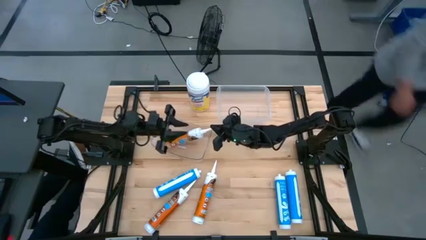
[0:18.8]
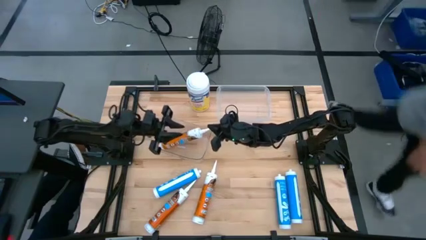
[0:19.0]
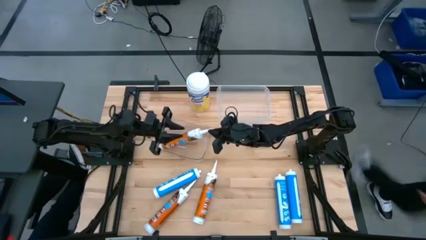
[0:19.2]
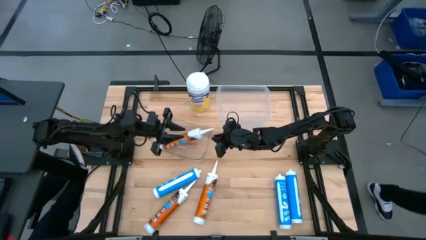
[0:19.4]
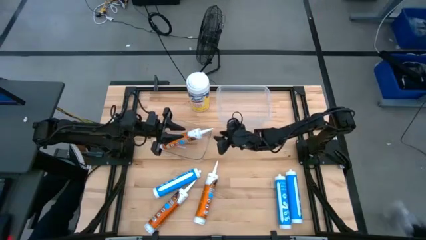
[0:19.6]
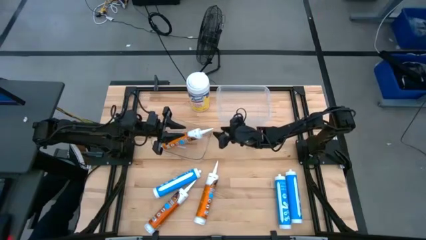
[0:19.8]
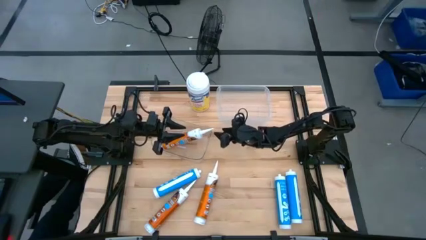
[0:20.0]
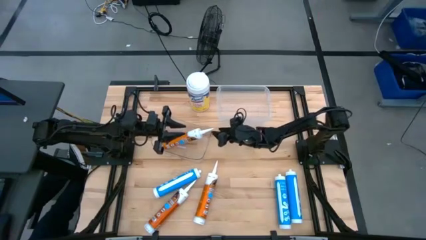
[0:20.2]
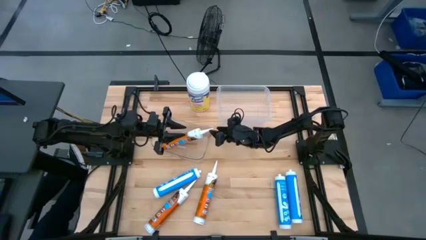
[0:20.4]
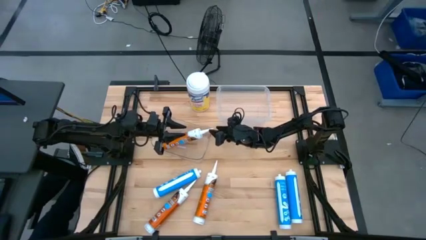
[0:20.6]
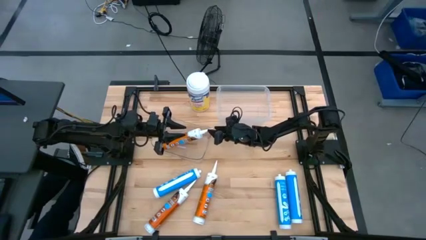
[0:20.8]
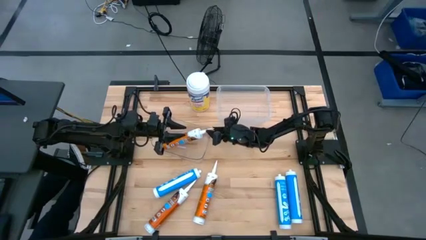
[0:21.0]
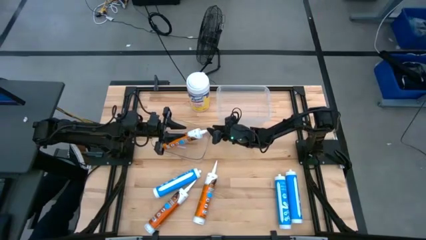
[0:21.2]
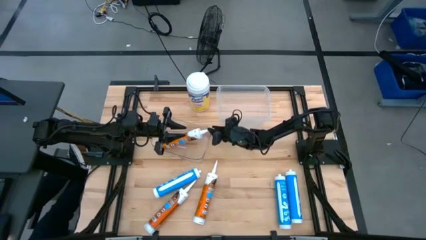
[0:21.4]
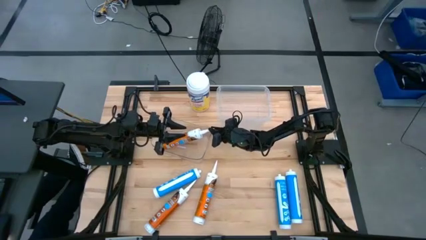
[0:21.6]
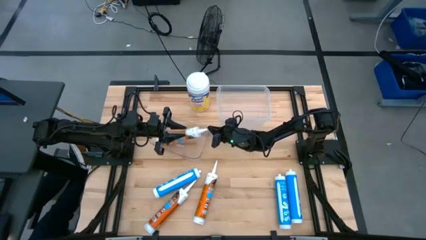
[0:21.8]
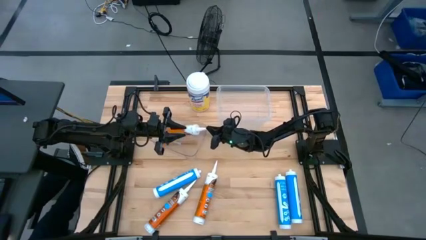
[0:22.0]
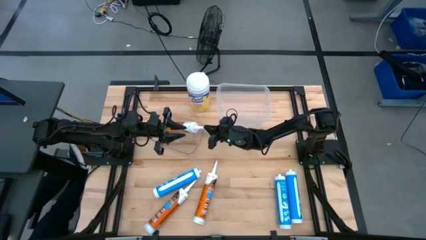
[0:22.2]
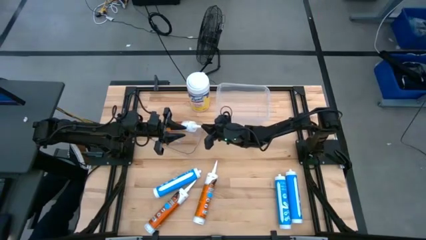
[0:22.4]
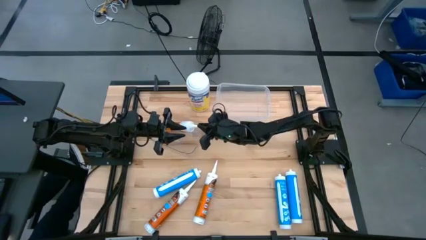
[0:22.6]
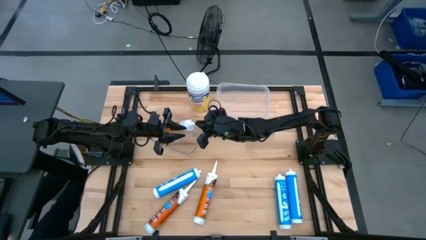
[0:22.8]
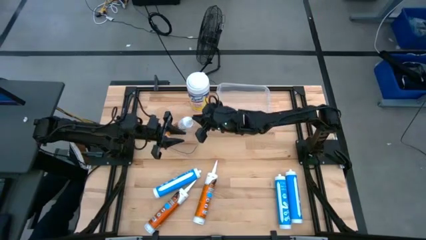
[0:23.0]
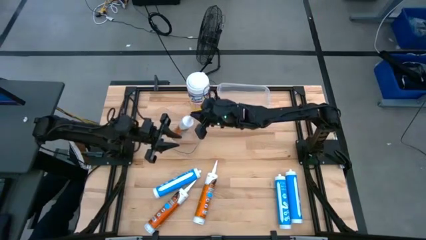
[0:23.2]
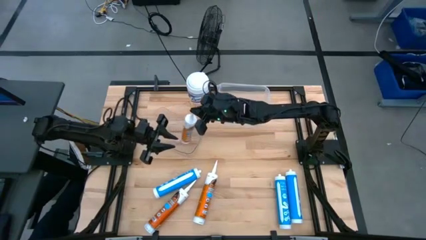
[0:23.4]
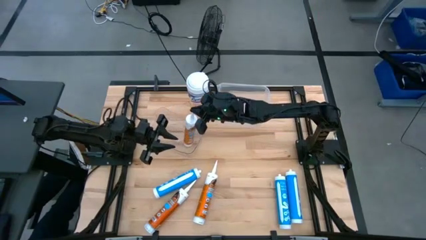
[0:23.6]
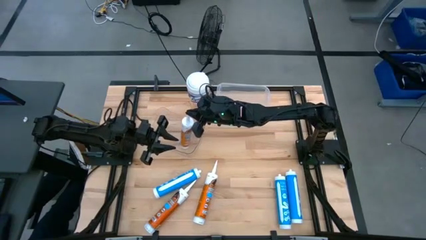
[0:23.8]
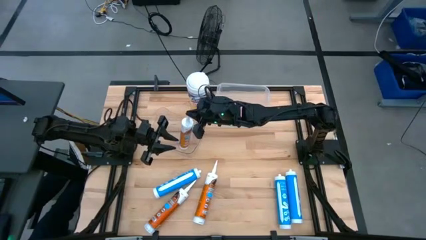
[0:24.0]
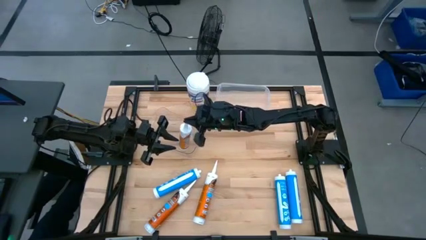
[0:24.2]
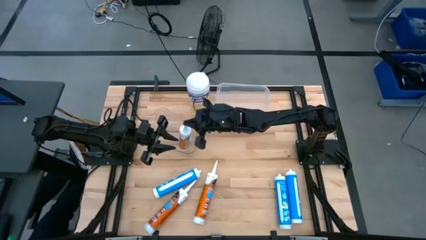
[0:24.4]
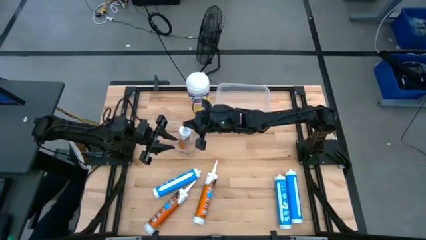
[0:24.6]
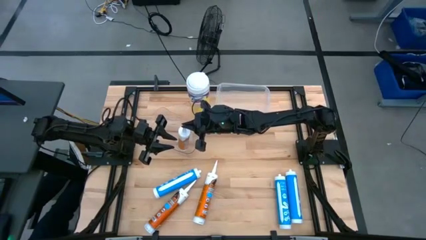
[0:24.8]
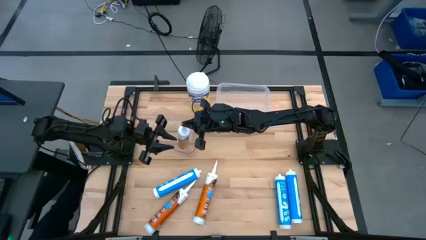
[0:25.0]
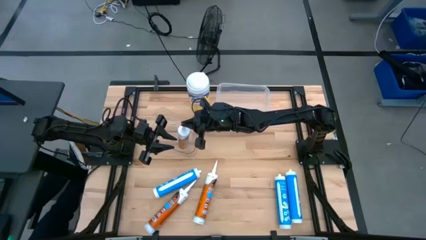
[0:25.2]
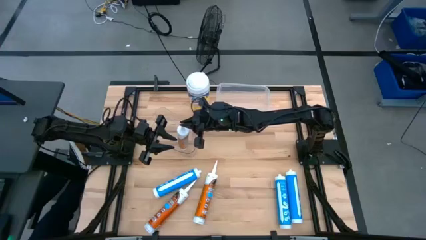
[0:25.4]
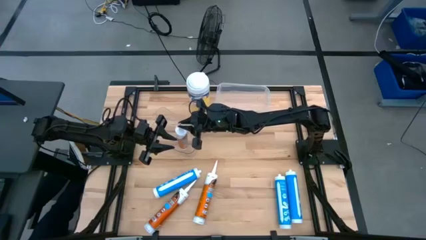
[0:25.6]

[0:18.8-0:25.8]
Task: Pick & place silicon tubes, Sealant and Lysol wipes
Put the right orange sealant into the left transparent bin

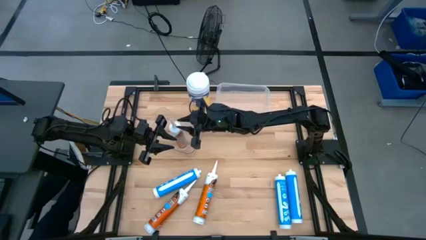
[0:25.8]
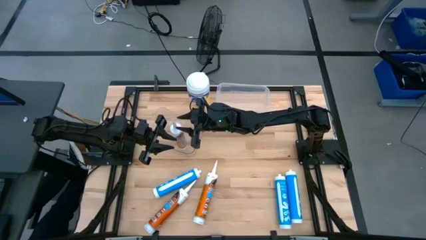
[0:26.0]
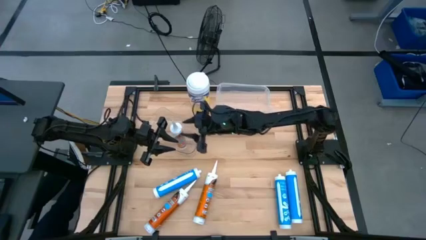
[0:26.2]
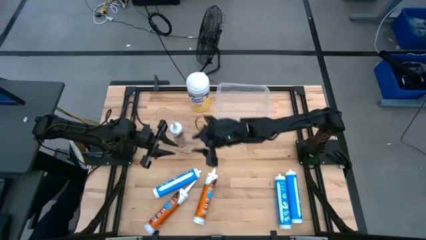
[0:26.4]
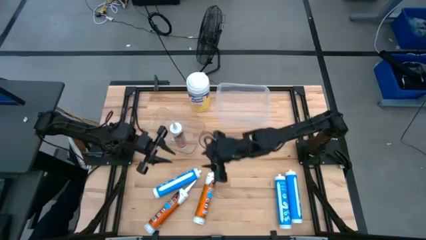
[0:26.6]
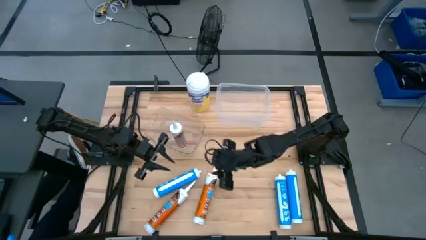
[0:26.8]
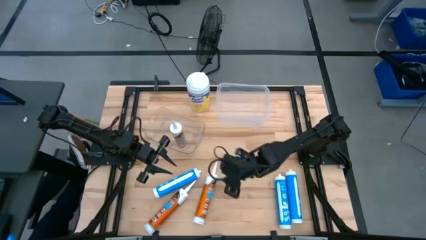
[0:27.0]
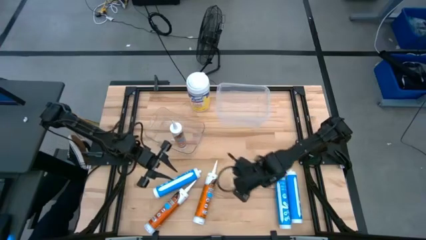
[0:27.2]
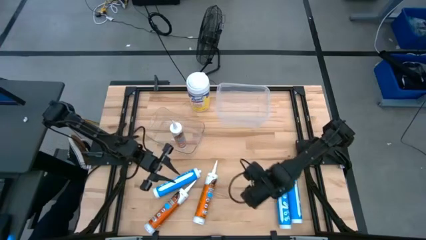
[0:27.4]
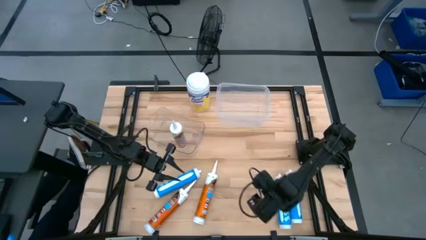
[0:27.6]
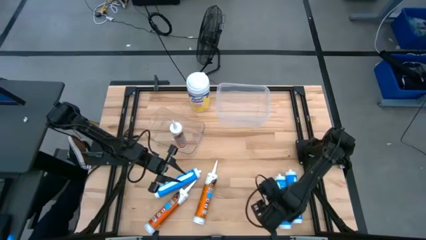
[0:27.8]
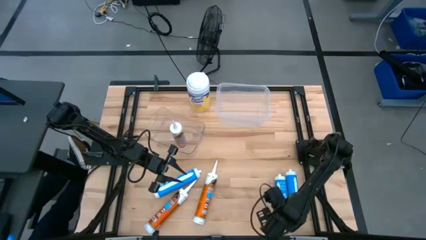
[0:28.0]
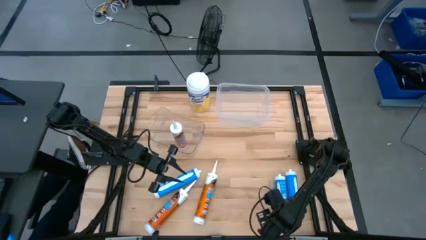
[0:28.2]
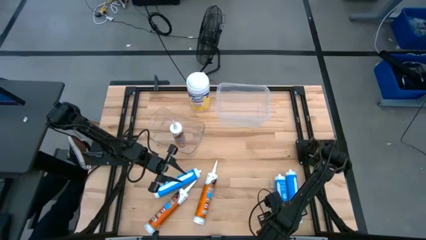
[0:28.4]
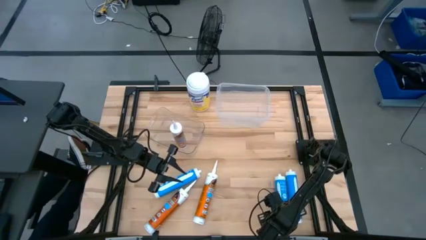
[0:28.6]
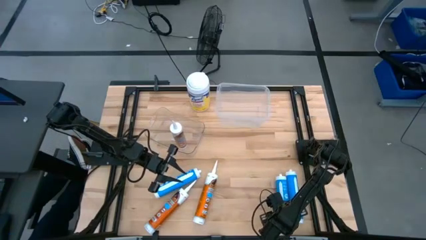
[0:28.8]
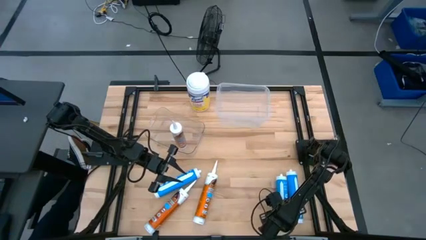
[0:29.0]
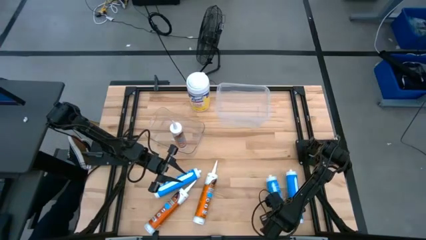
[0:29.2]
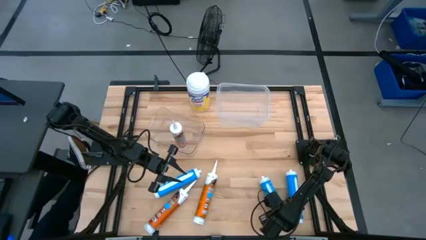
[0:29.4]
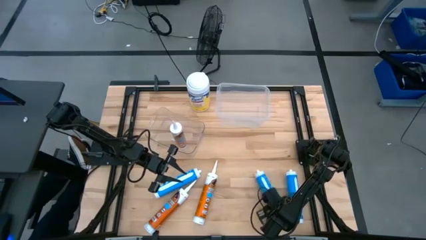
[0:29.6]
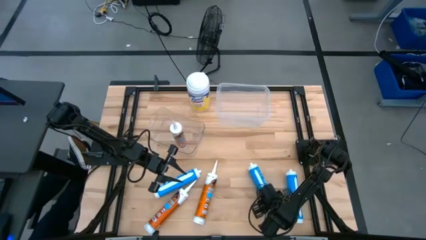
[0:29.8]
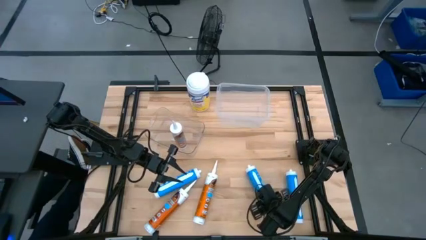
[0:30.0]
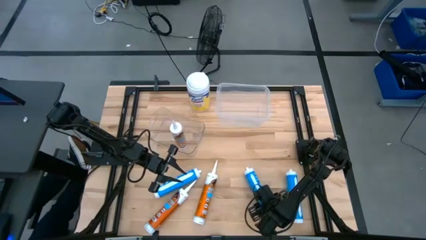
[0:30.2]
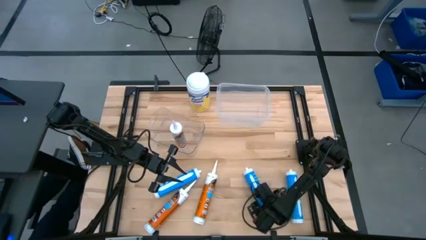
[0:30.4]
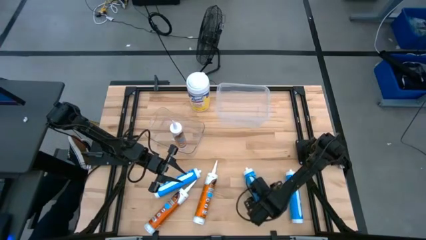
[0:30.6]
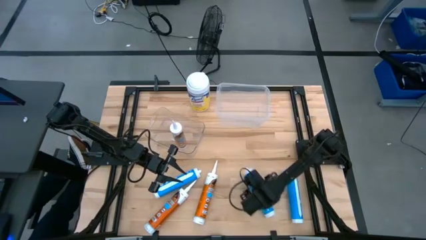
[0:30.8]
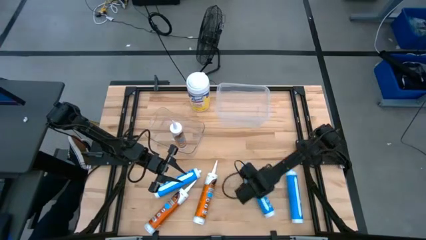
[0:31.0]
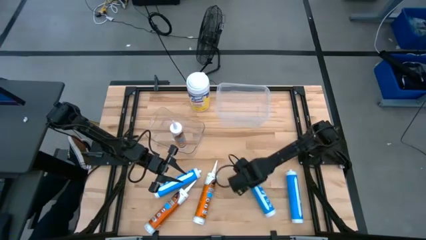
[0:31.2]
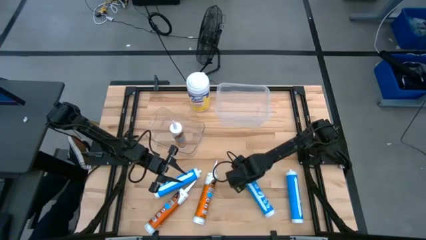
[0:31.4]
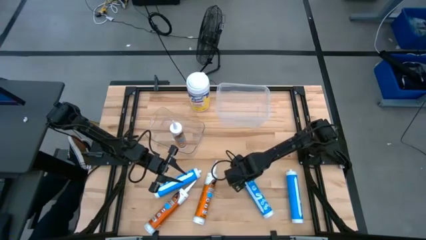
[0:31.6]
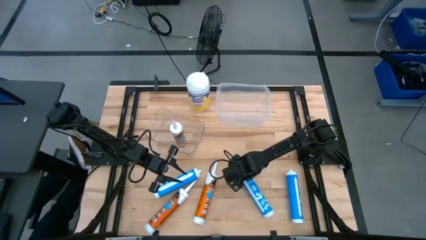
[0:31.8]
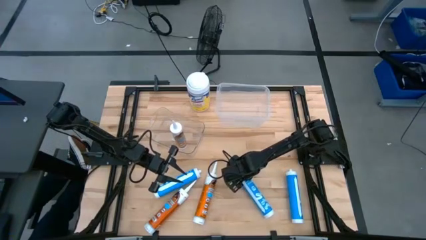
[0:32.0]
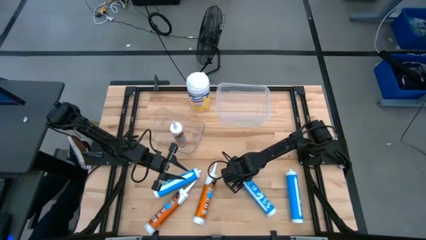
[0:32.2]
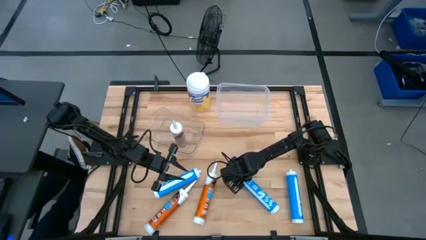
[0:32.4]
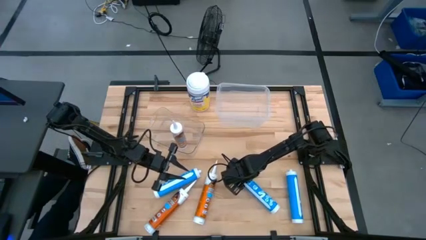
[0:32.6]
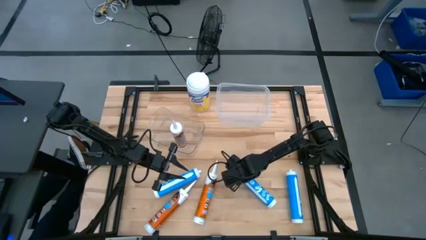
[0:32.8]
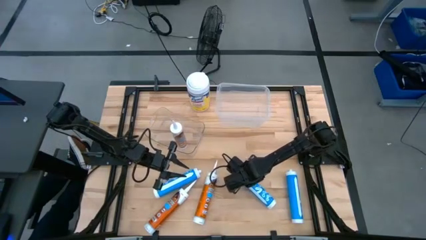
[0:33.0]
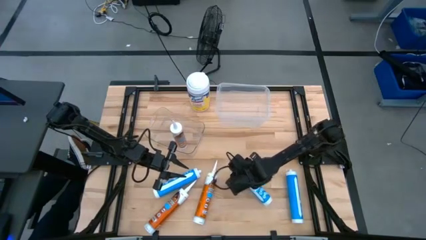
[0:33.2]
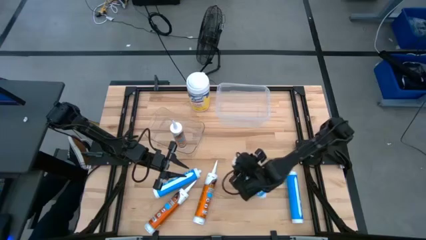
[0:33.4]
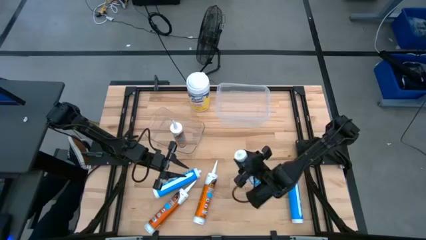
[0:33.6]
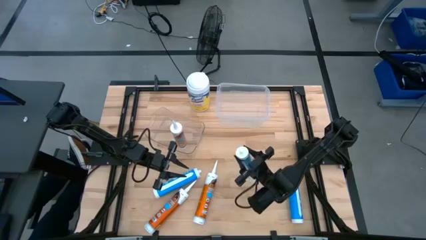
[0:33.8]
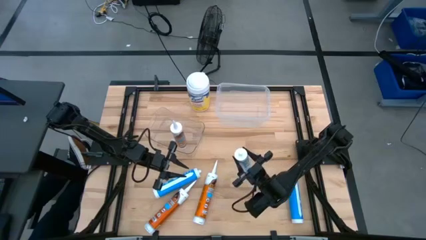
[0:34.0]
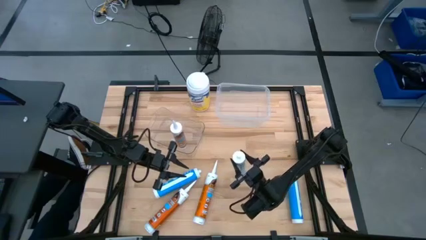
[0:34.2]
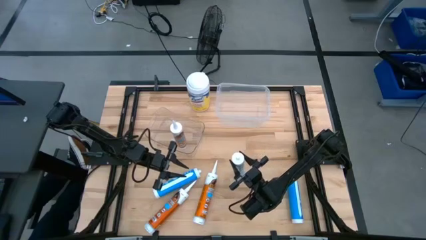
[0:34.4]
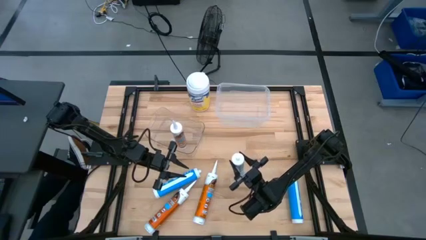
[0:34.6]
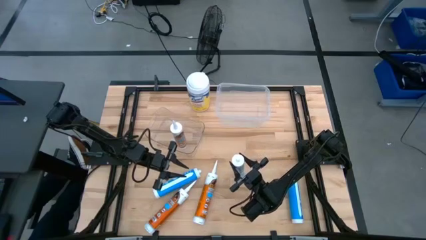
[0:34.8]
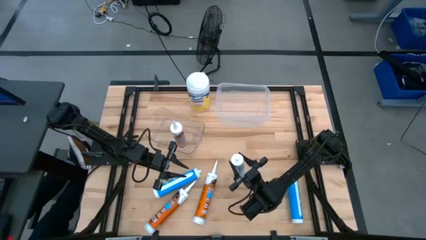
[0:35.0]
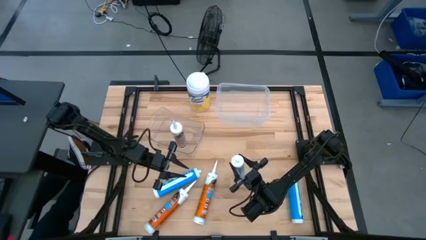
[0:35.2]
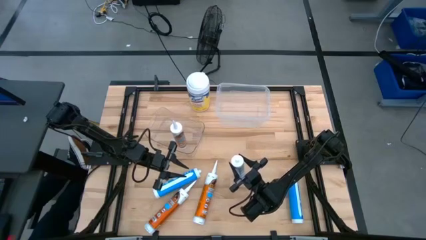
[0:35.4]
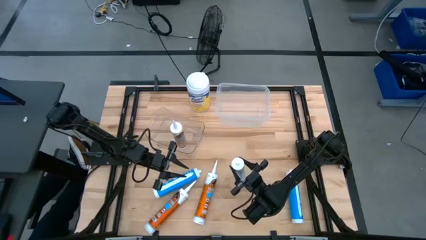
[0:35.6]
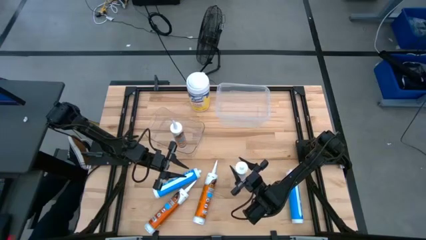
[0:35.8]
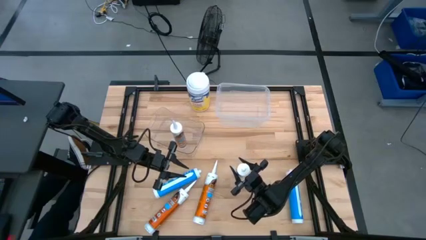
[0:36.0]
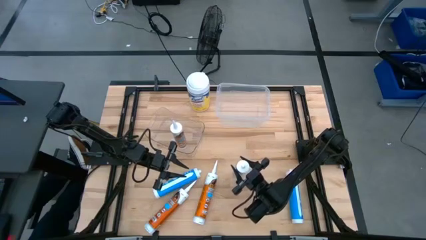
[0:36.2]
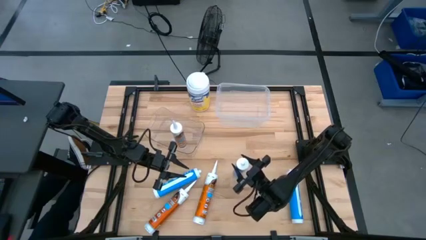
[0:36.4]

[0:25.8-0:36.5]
Put the middle blue sealant into the top transparent bin
